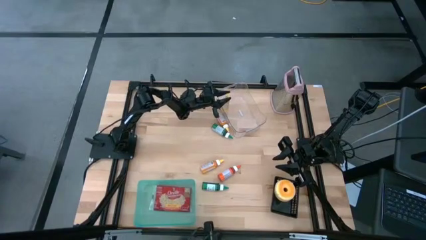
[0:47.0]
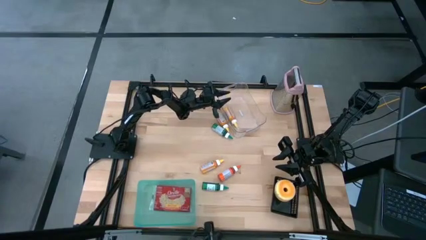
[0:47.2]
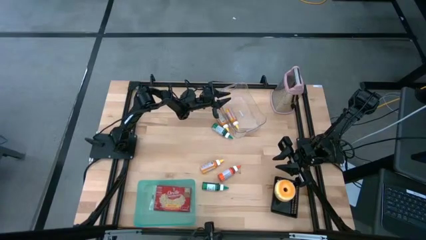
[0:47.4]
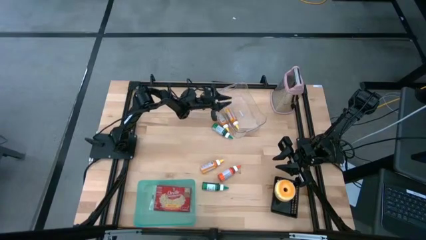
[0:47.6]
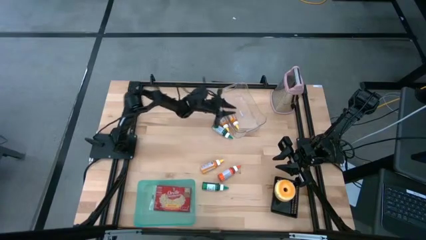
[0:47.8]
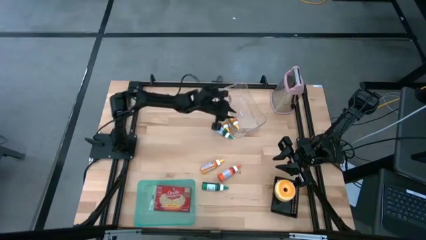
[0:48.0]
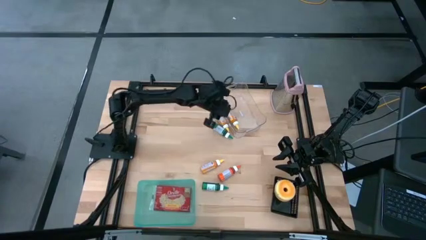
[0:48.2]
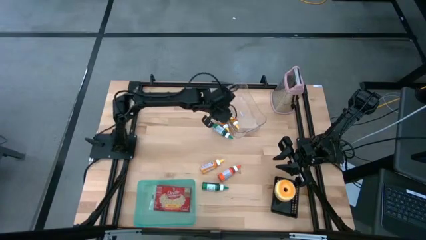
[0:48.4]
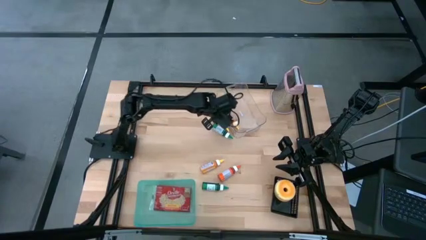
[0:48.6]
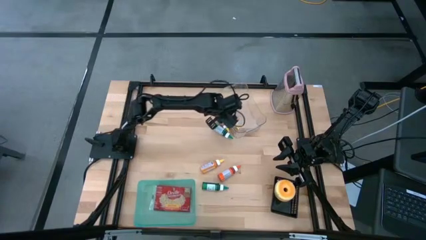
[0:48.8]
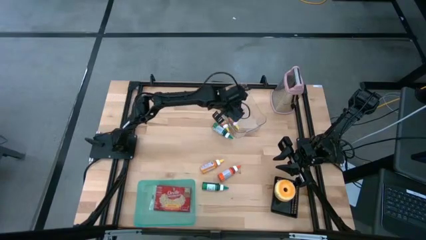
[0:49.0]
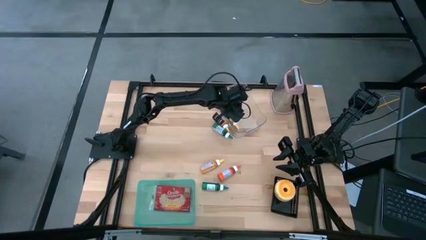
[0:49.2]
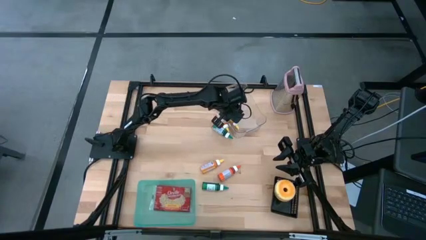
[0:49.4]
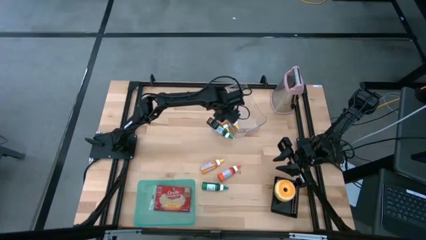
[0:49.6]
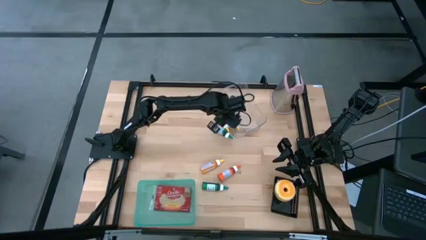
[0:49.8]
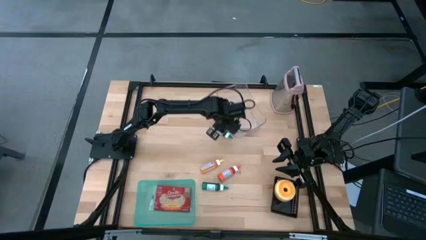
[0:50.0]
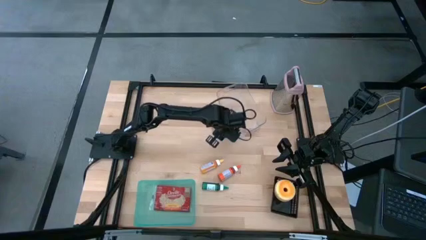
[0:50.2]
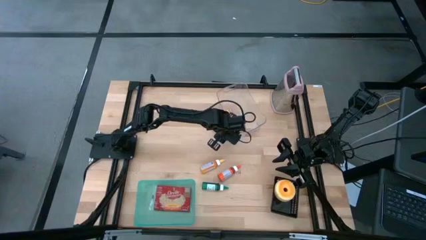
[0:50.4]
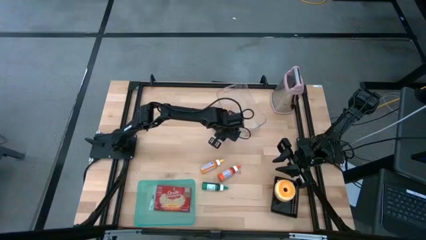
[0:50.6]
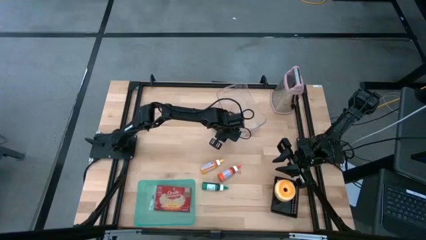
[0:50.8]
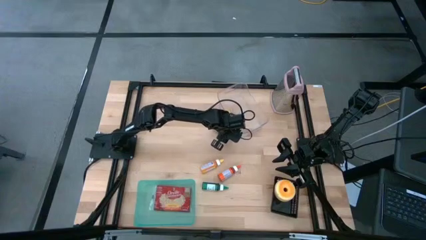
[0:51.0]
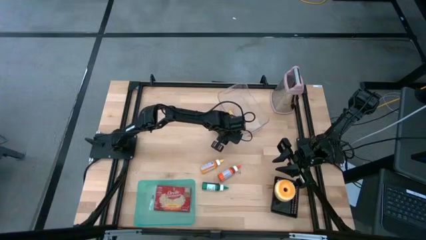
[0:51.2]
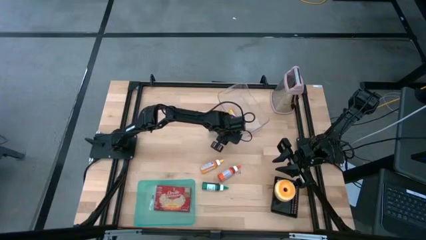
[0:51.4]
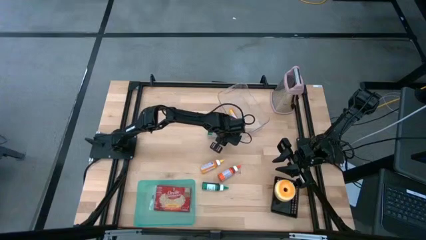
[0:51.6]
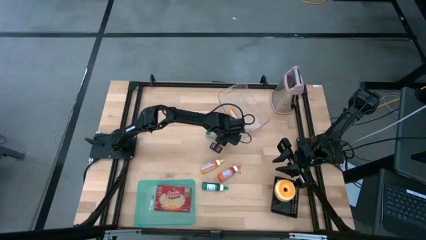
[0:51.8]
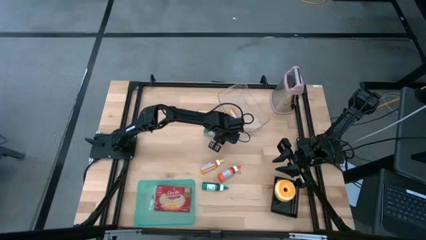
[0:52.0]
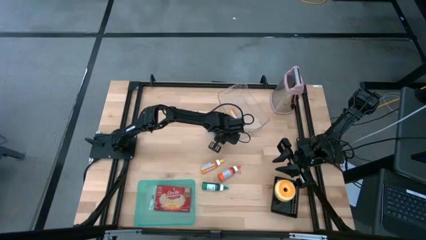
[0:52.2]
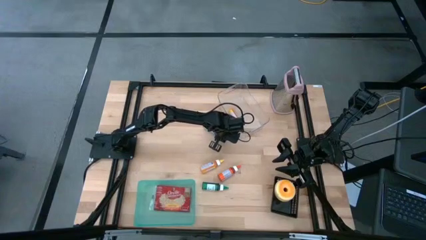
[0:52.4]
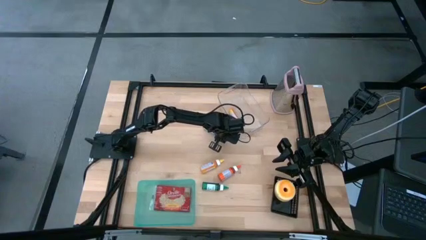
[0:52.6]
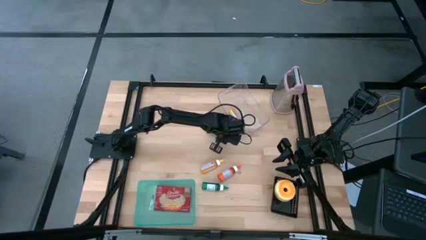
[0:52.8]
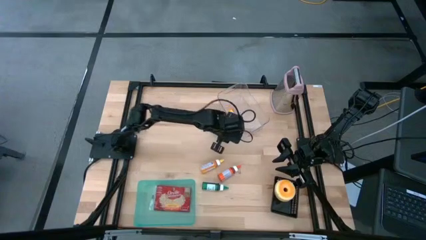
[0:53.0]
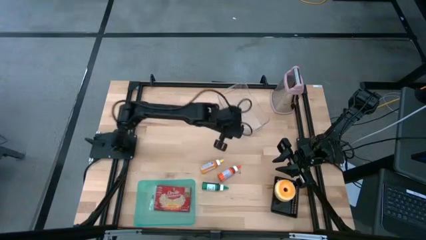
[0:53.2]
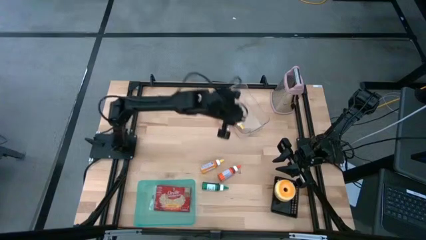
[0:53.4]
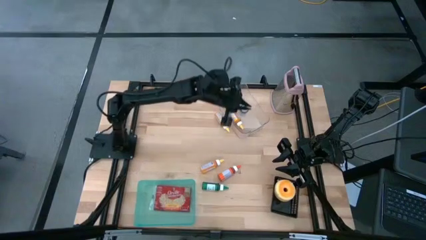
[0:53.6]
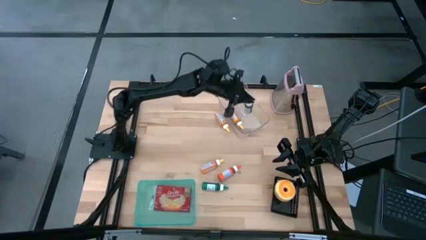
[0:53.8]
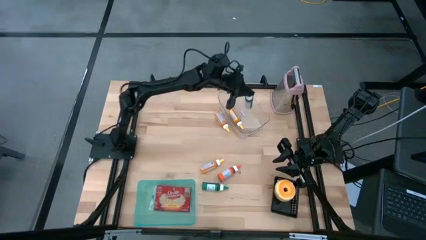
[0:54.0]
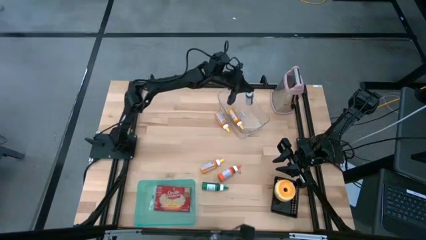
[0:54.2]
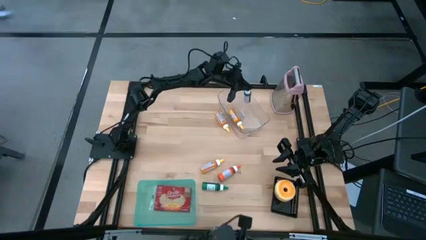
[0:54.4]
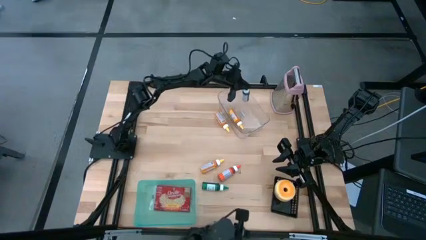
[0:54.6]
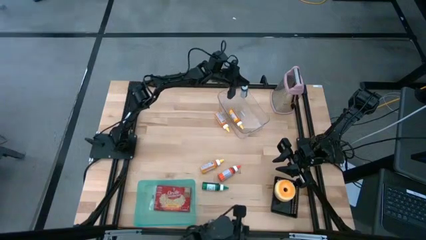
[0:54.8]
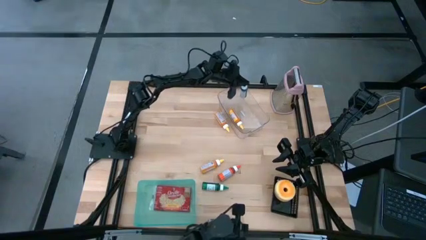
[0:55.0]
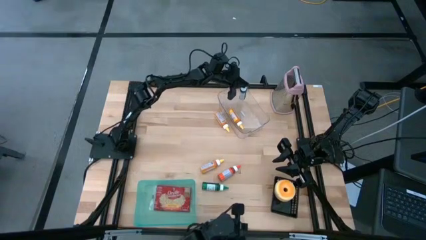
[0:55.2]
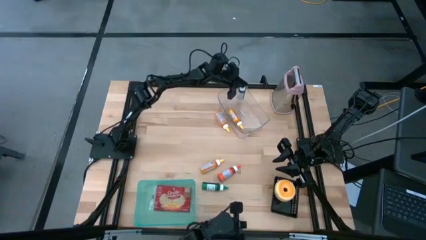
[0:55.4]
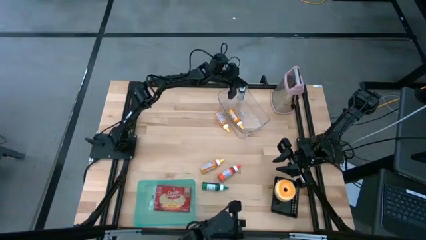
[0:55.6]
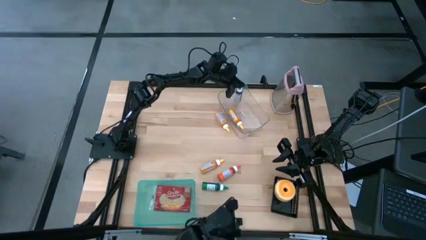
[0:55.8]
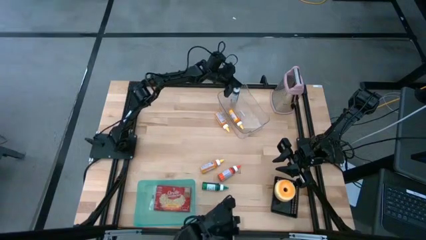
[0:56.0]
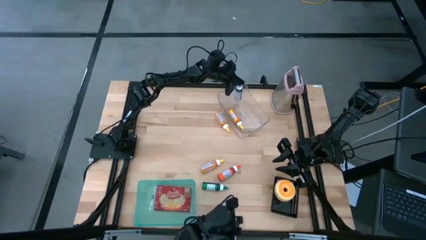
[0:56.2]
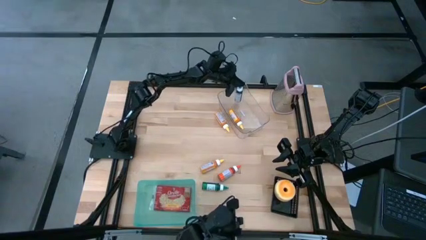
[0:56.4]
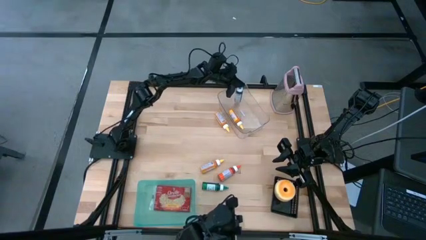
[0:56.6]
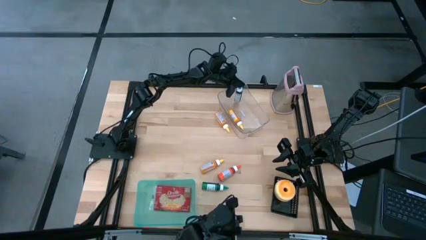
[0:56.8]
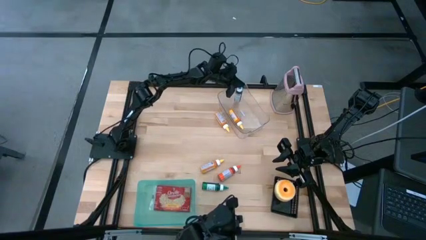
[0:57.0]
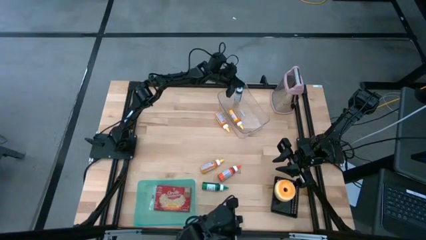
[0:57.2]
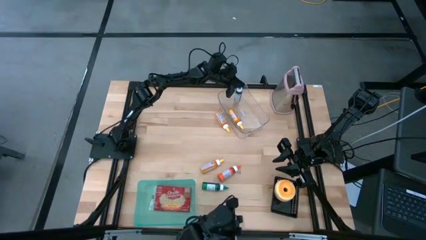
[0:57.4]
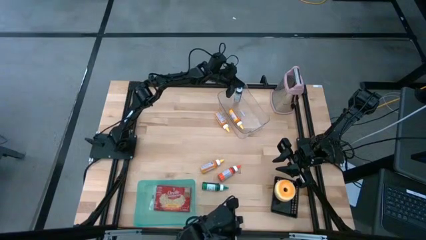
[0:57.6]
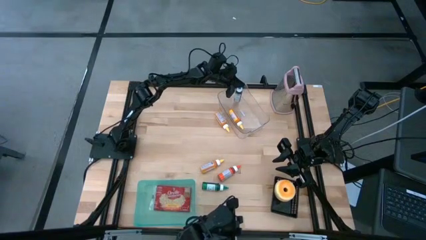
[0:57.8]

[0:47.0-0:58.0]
Task: Pick & Place Food Item
Put the top green food coloring into the transparent bin

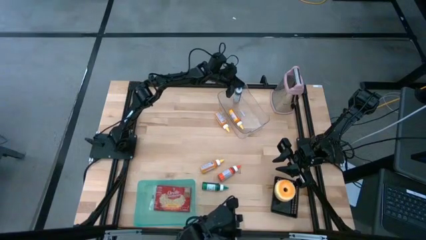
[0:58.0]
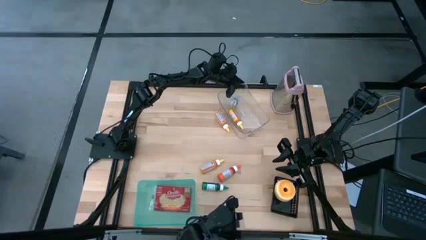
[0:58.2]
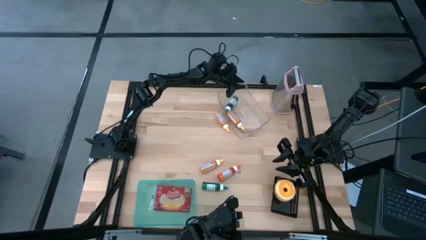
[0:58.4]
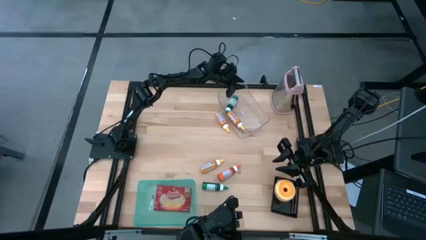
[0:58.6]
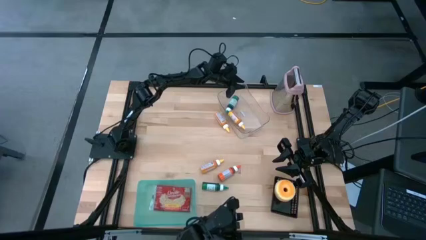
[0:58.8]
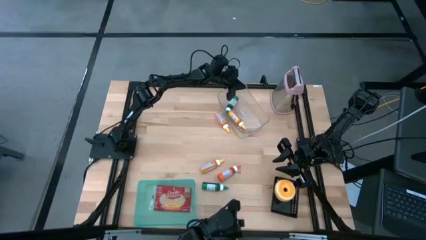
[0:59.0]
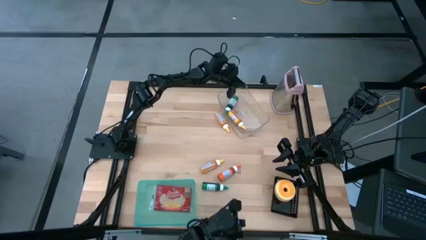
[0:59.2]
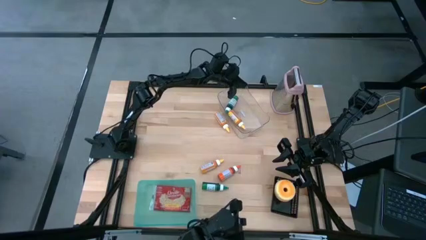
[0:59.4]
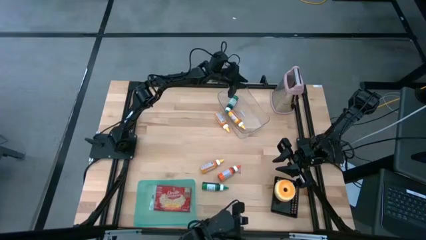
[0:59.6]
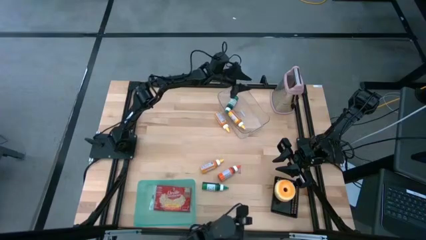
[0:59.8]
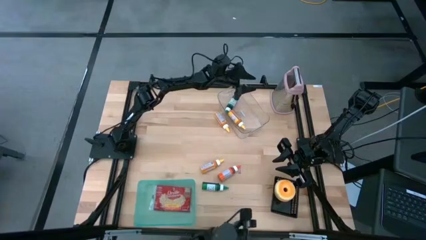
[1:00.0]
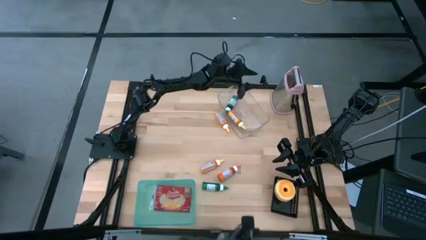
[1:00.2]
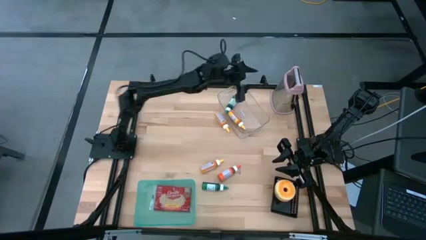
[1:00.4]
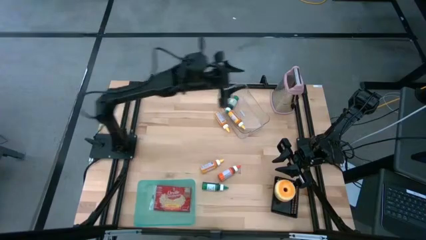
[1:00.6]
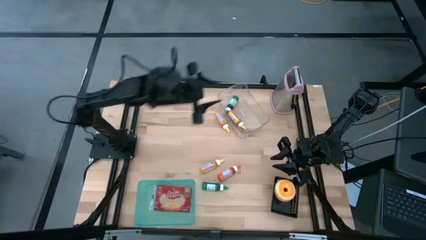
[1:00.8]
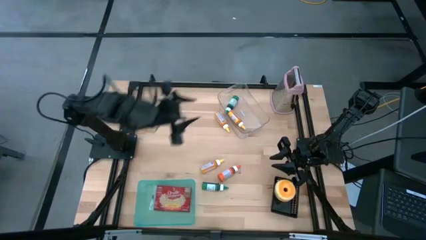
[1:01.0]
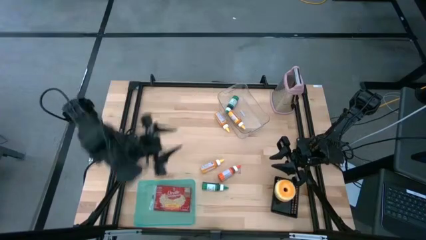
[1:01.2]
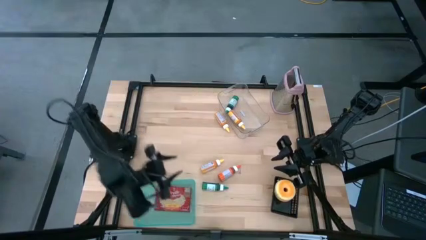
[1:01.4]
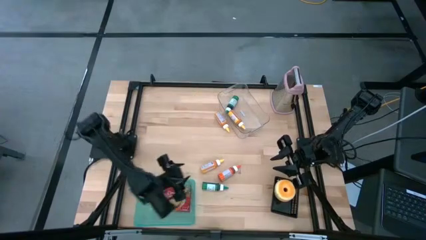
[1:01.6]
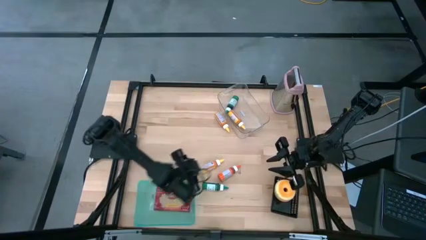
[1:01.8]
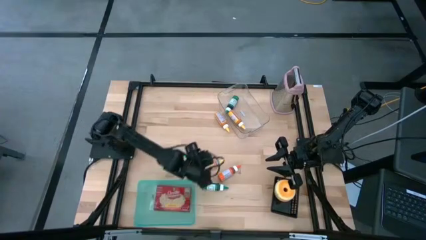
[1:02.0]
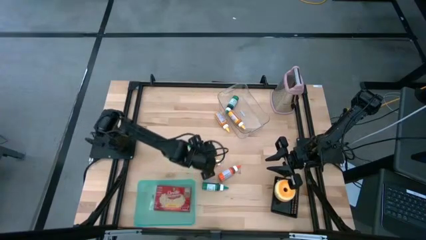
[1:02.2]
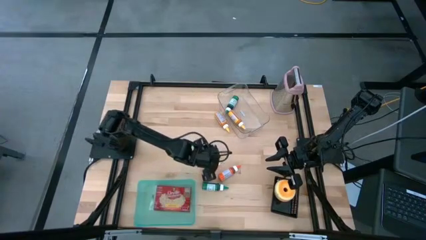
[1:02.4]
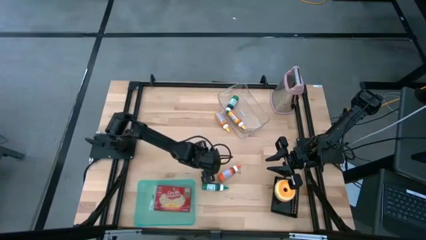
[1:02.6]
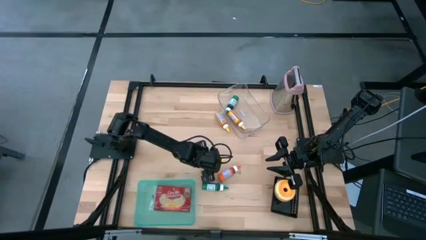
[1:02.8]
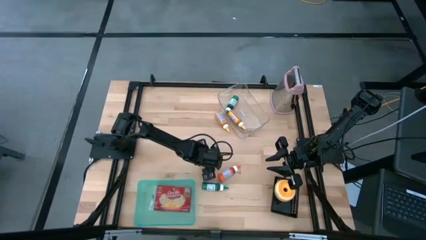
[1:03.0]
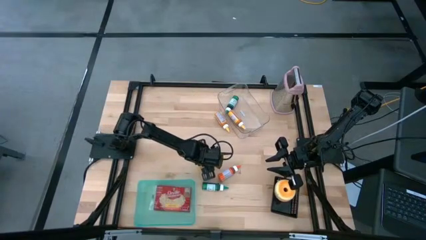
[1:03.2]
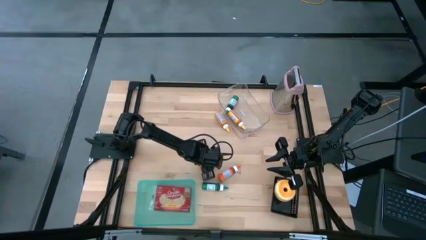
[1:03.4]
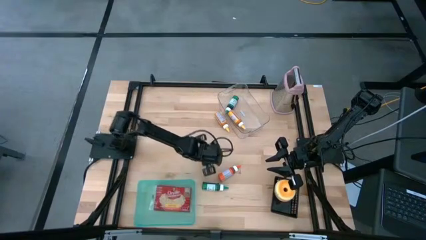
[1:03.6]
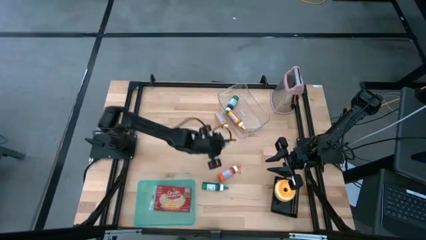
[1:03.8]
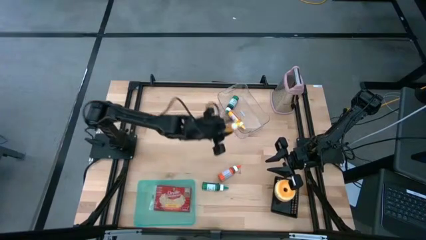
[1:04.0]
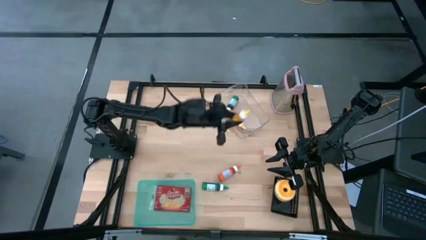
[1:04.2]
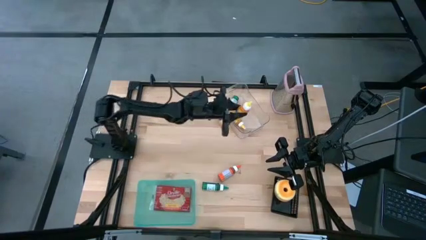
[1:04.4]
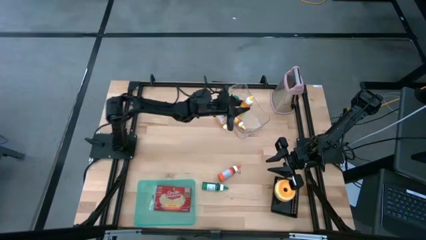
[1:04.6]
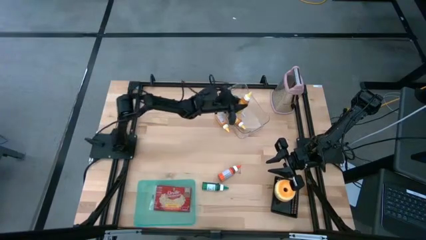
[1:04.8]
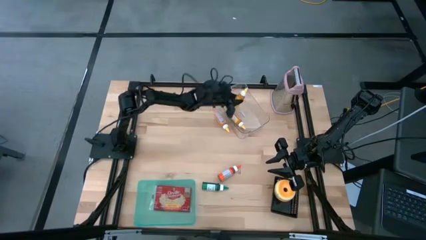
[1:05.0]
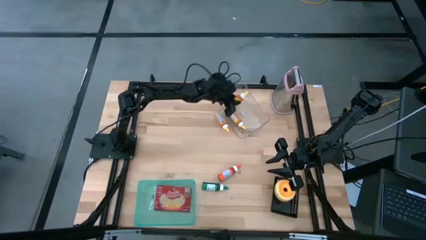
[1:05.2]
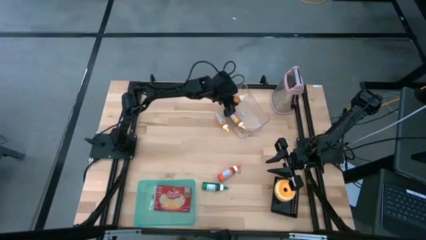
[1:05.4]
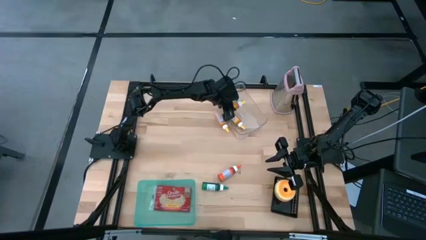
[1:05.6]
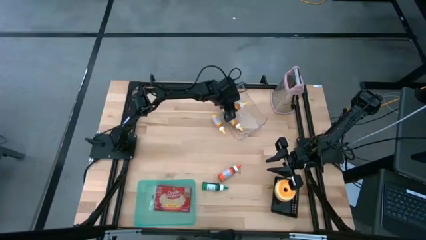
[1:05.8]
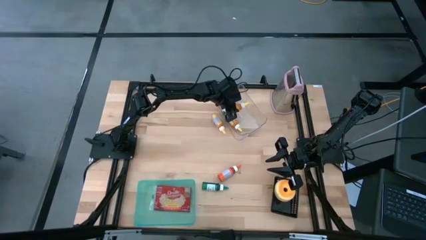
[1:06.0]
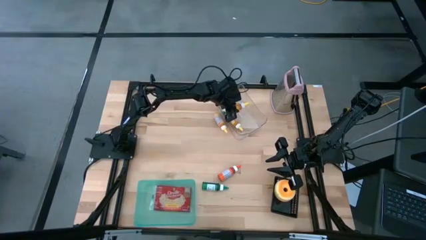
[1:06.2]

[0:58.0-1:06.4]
Put the bottom orange food coloring into the transparent bin
